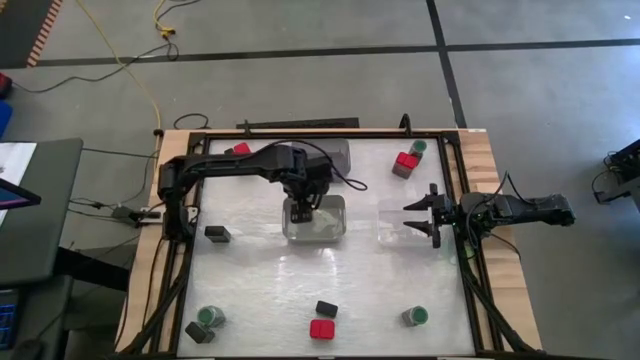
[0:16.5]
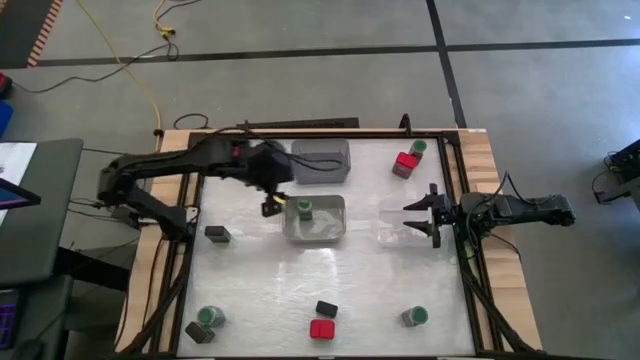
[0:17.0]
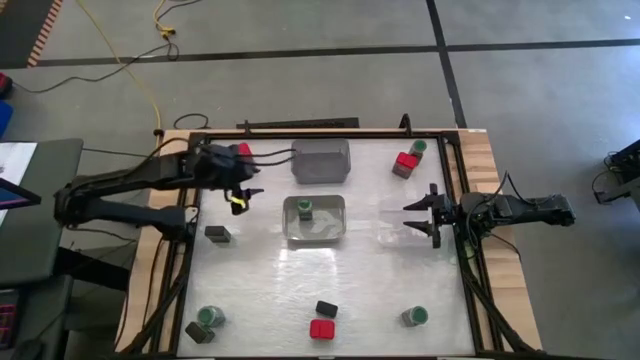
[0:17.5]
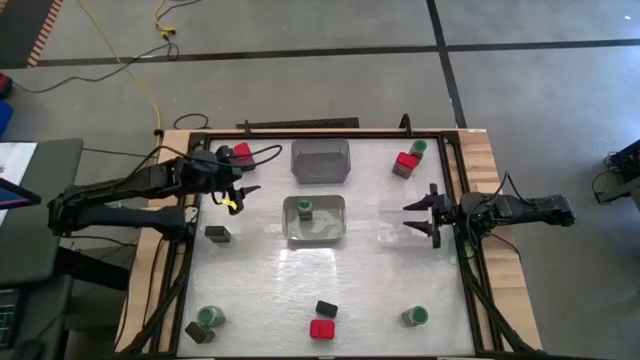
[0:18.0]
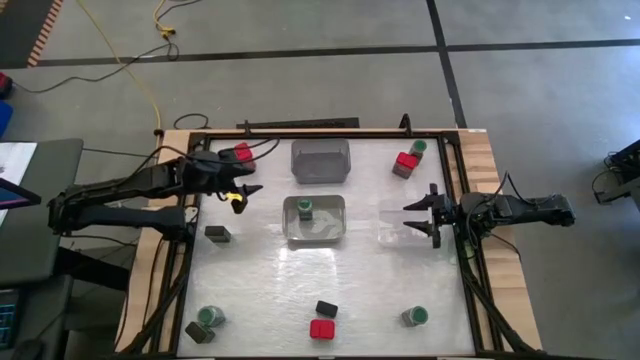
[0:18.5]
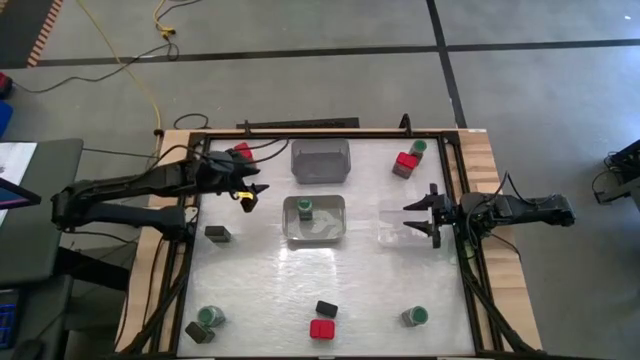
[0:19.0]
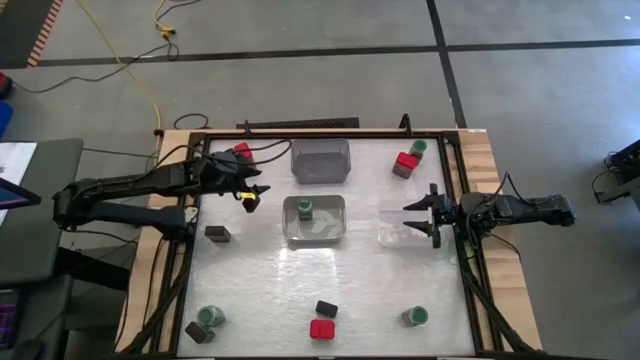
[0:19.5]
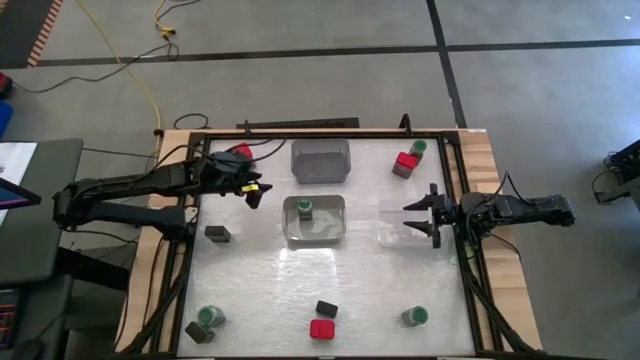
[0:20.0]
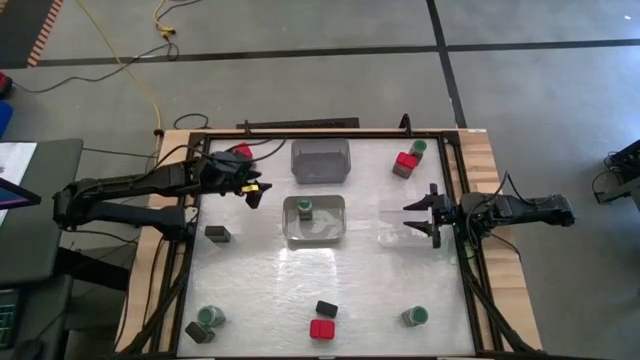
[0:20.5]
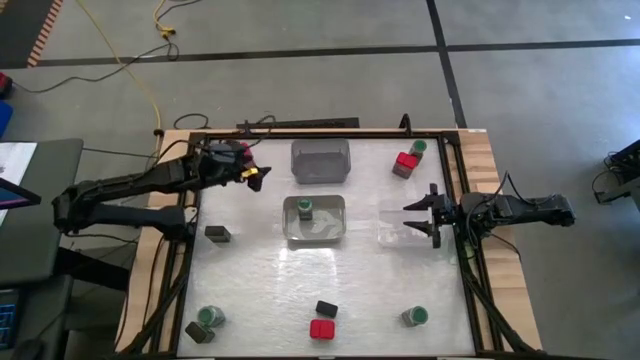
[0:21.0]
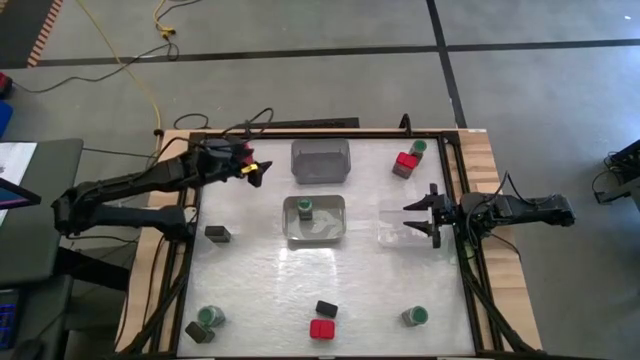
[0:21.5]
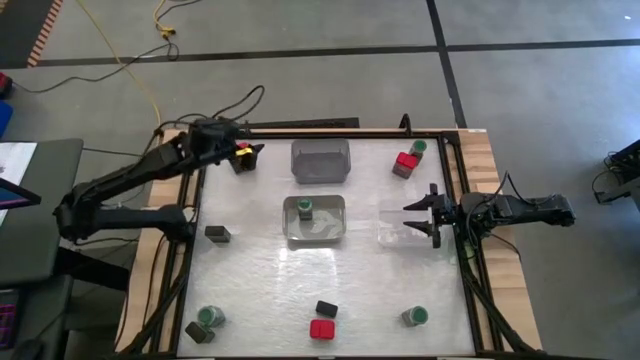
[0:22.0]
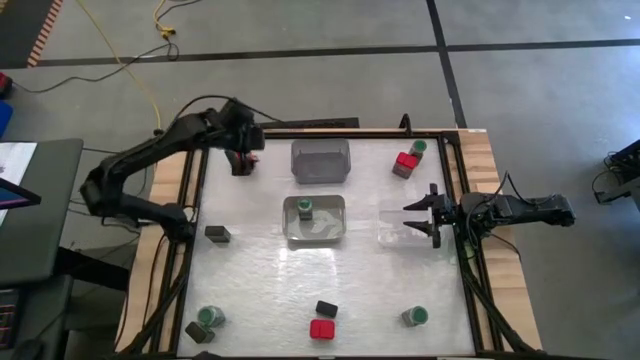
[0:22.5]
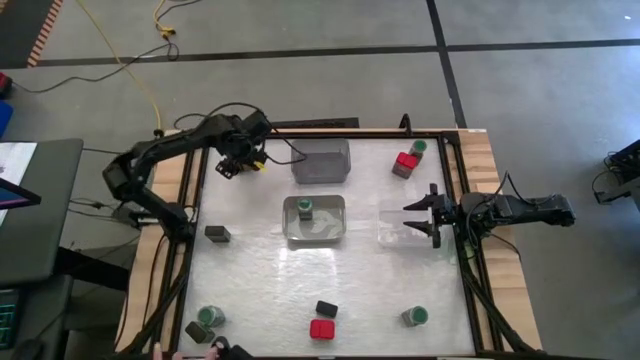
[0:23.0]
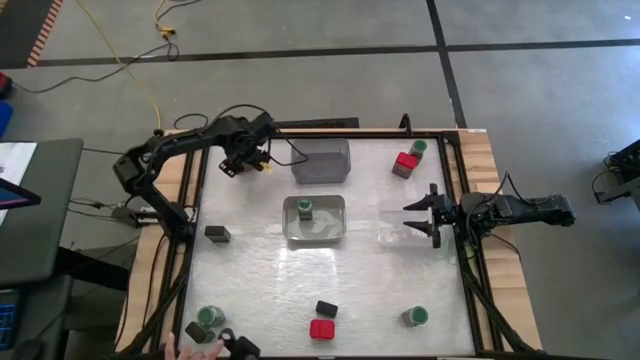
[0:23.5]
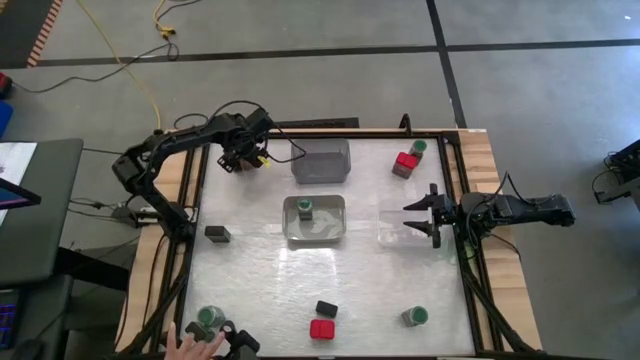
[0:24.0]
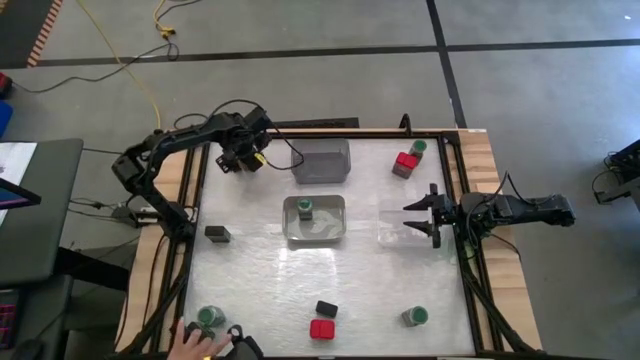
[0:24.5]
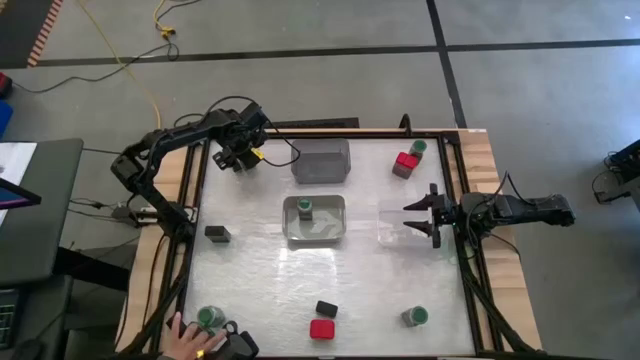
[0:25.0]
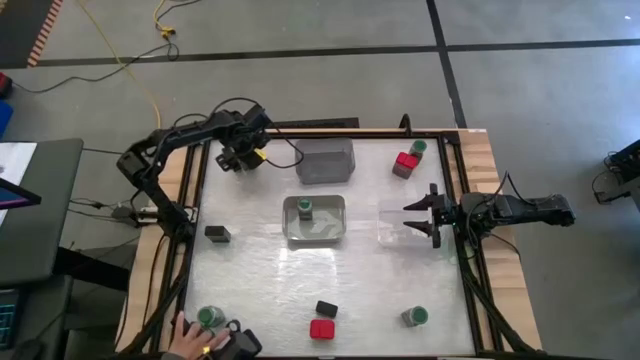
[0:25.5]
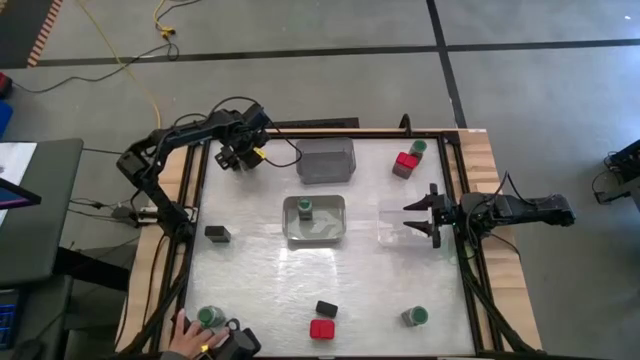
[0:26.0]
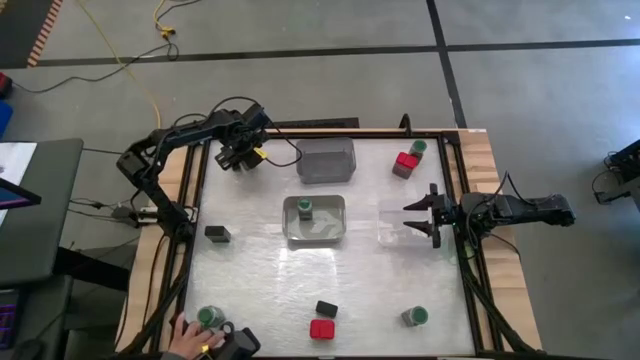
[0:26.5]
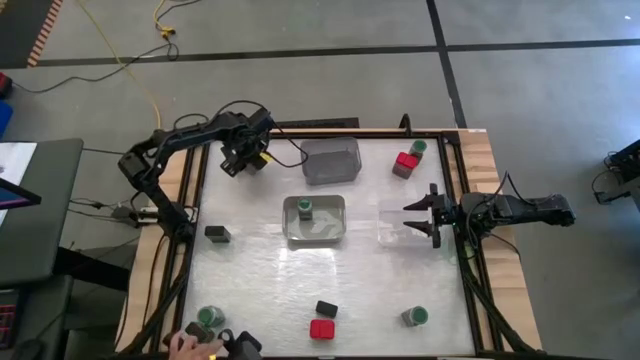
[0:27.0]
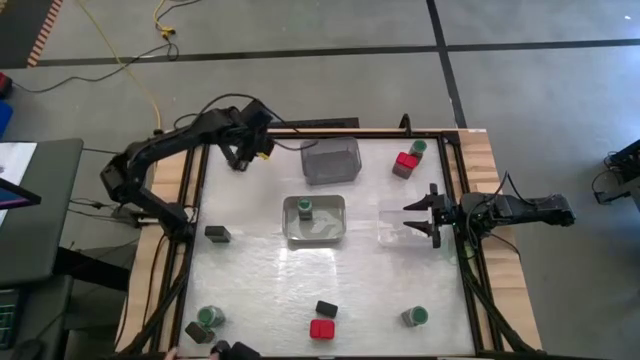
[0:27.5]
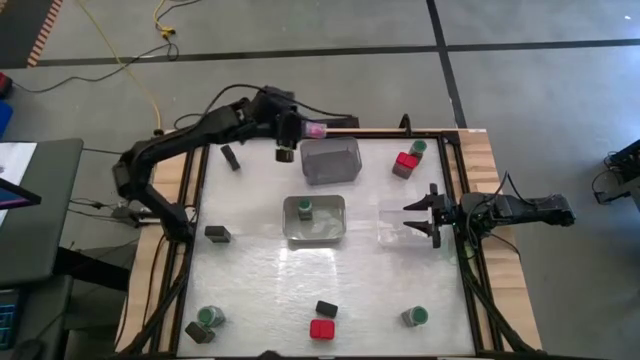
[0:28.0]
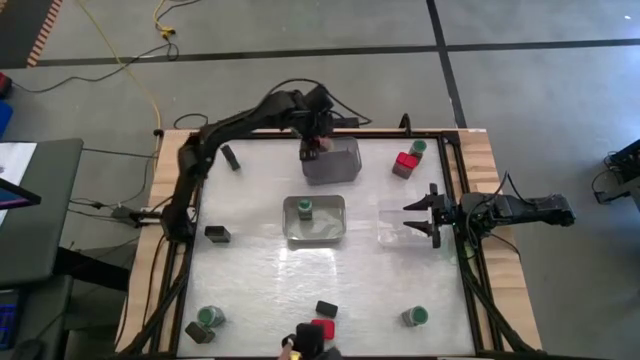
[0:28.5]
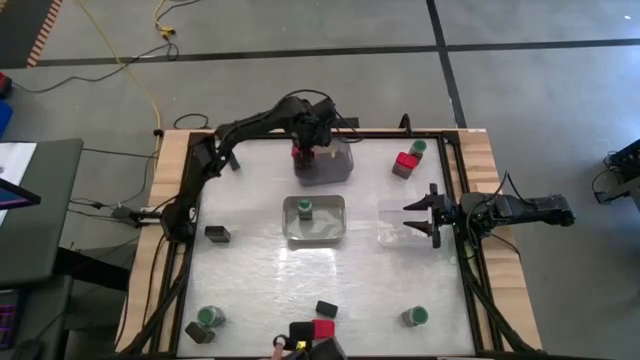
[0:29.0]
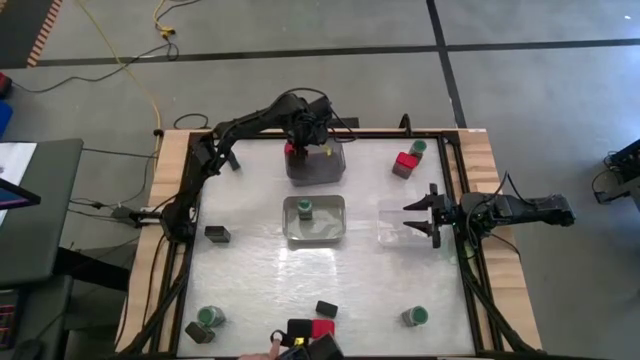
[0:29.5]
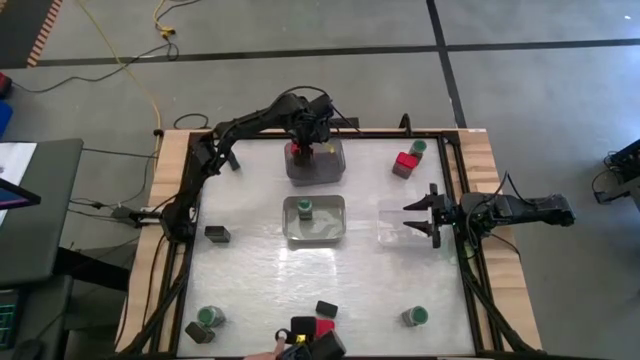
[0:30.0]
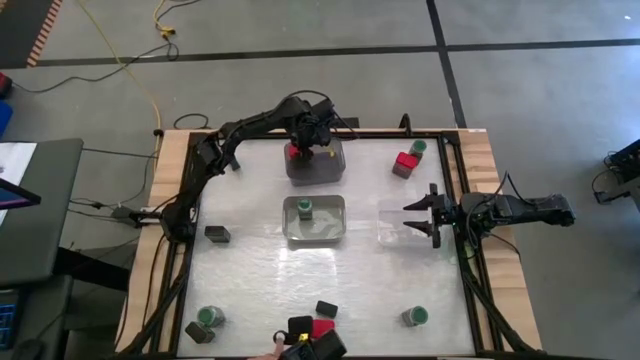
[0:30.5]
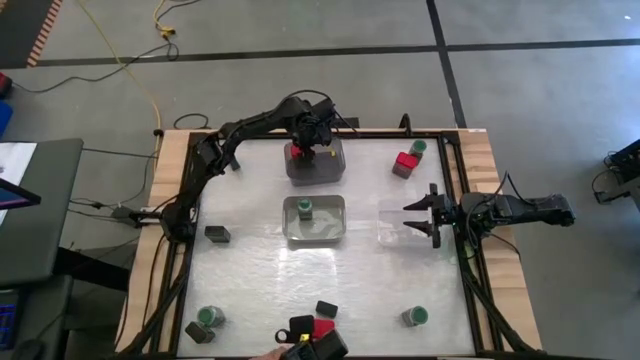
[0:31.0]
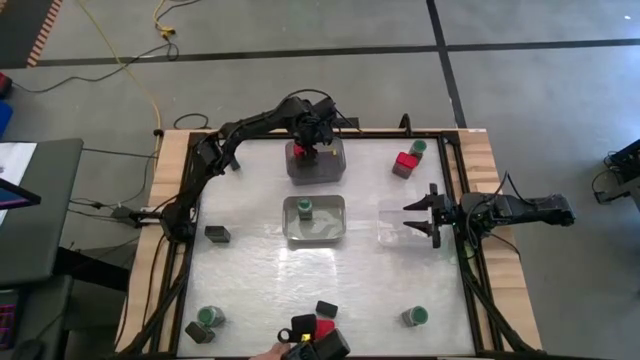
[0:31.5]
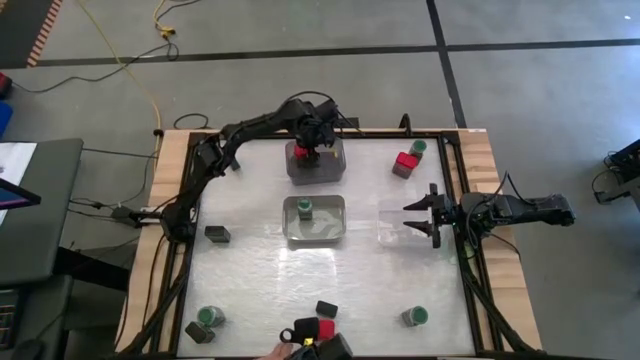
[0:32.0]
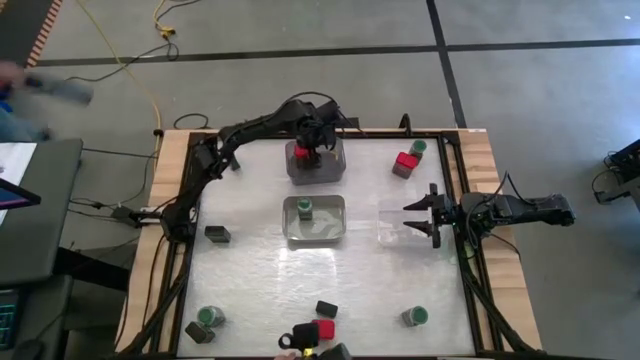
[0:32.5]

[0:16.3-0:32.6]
Task: Sort spices by type
Put the red spice can into the black bin
